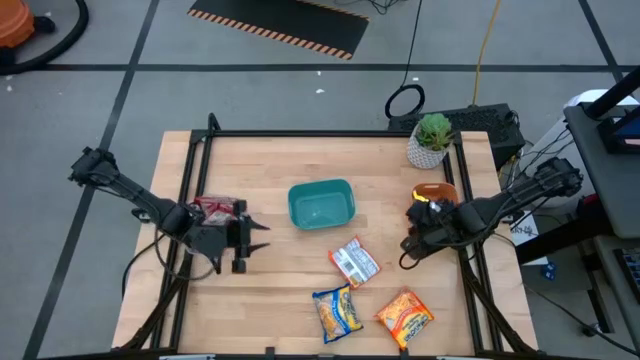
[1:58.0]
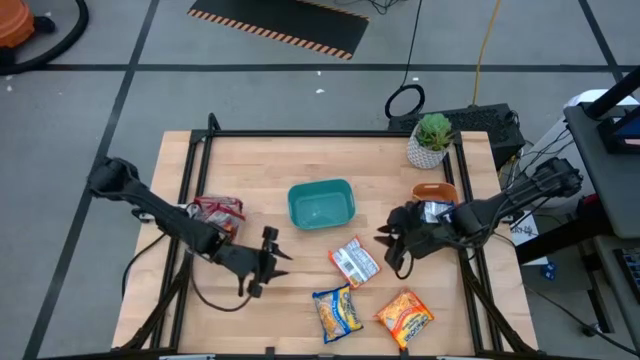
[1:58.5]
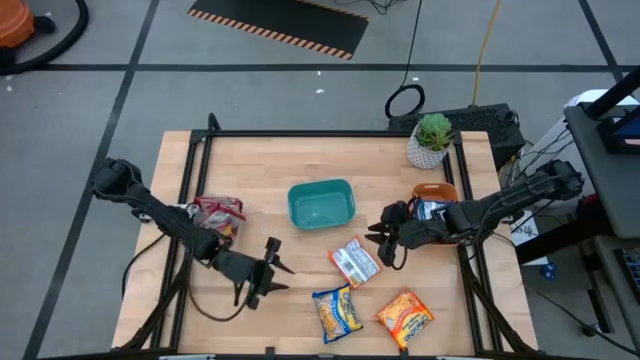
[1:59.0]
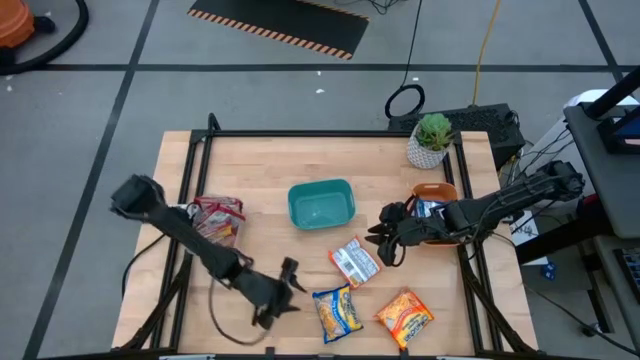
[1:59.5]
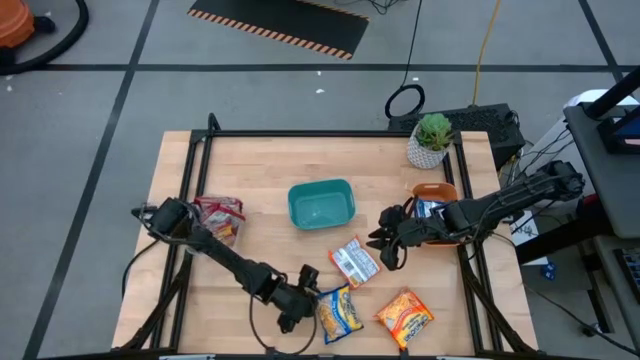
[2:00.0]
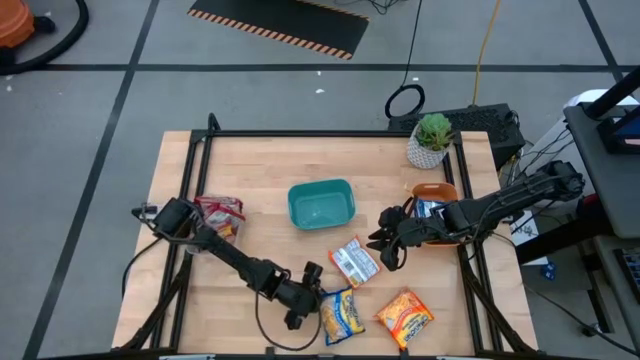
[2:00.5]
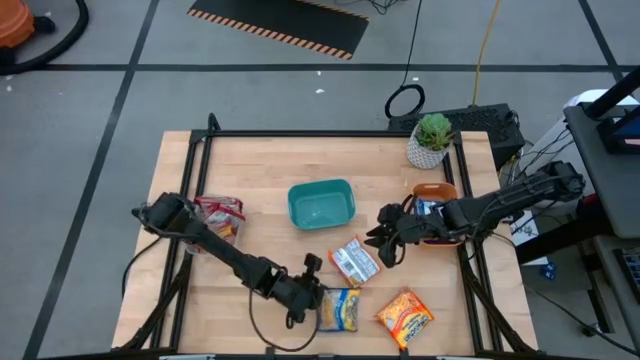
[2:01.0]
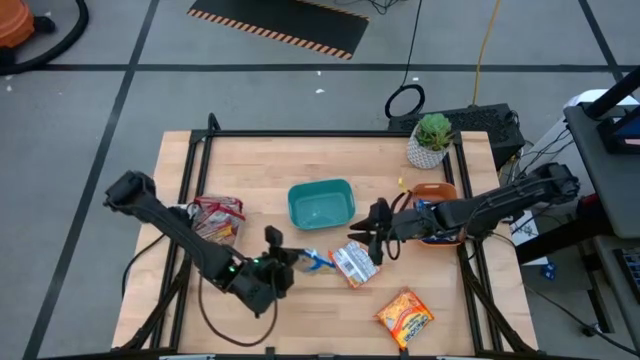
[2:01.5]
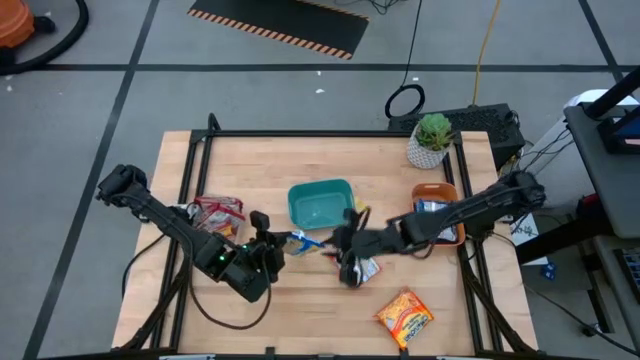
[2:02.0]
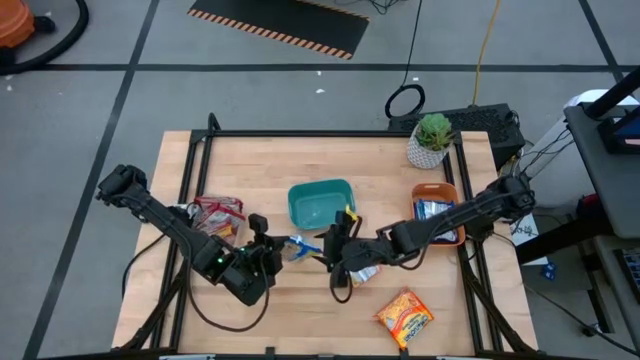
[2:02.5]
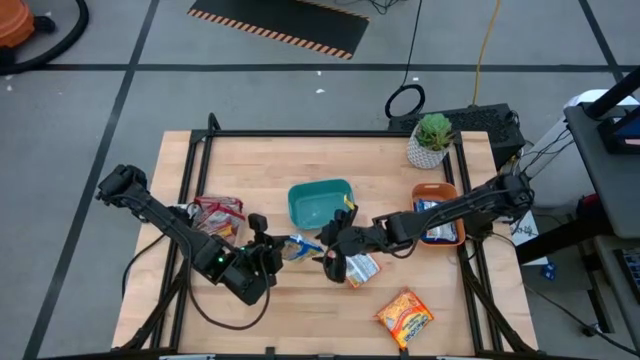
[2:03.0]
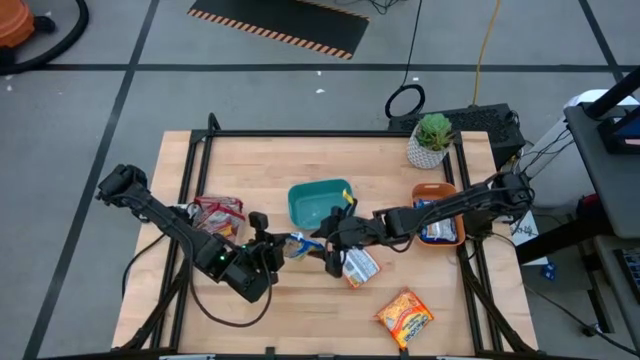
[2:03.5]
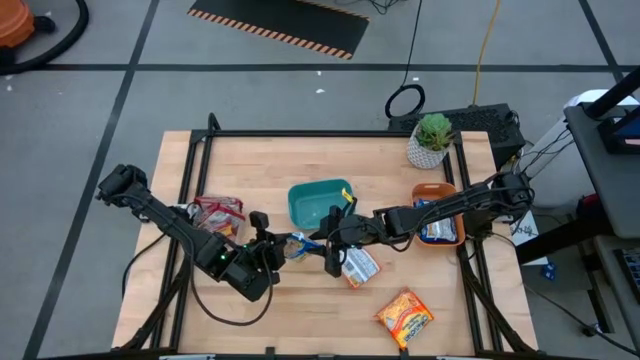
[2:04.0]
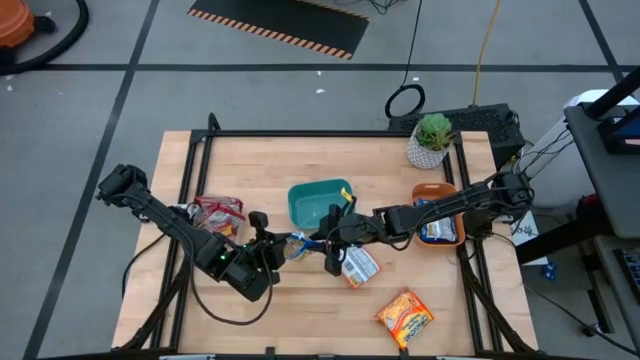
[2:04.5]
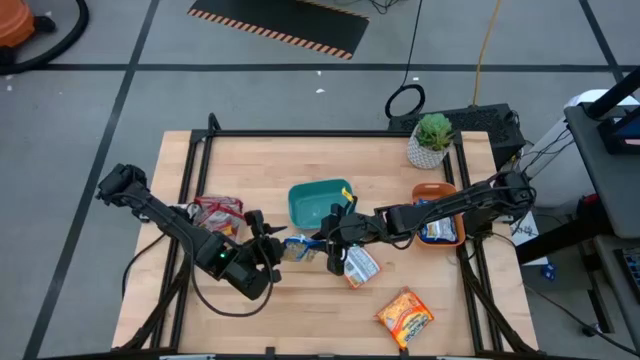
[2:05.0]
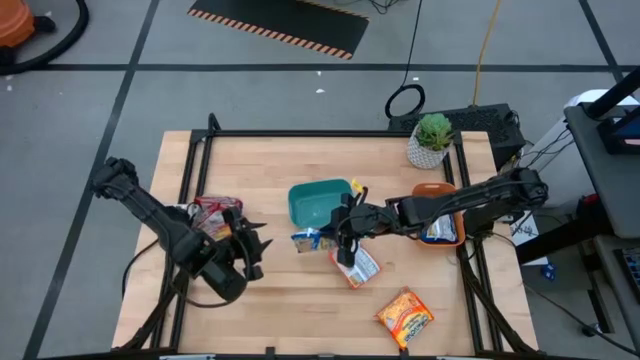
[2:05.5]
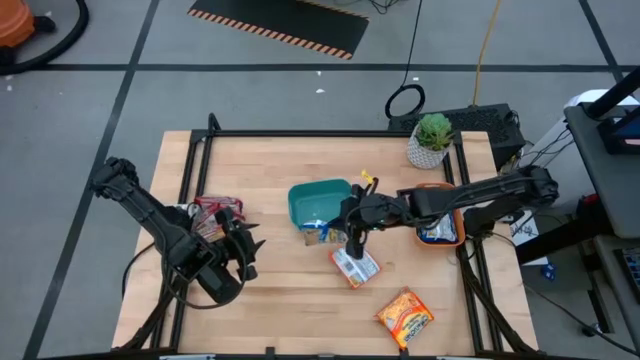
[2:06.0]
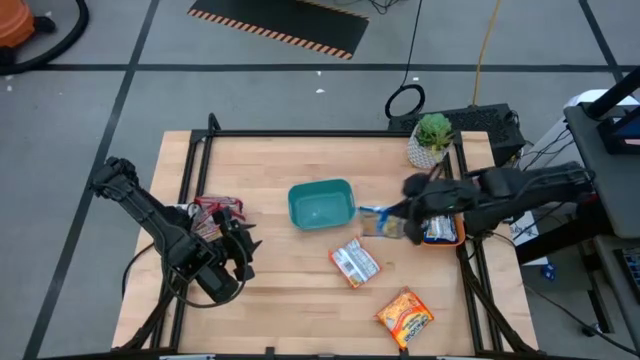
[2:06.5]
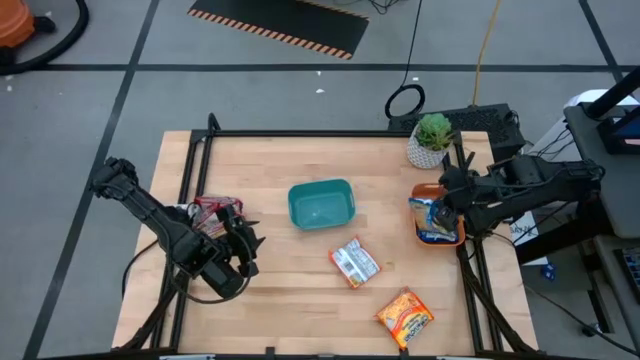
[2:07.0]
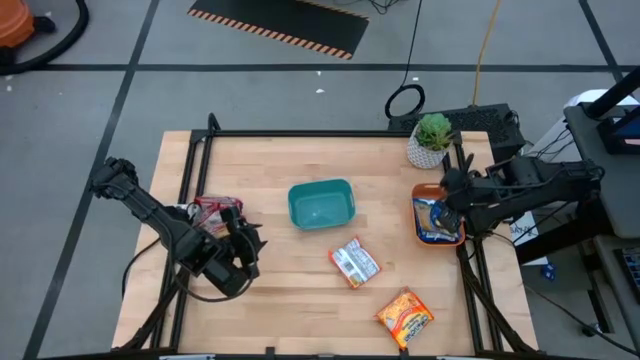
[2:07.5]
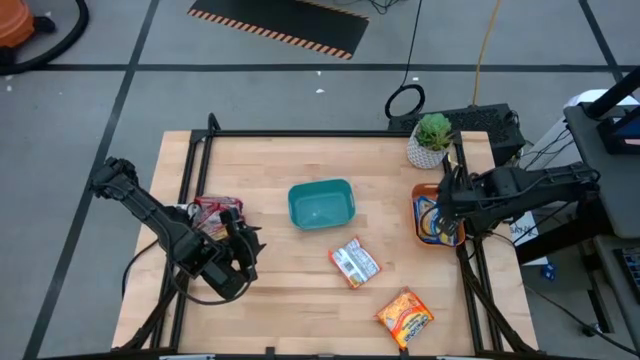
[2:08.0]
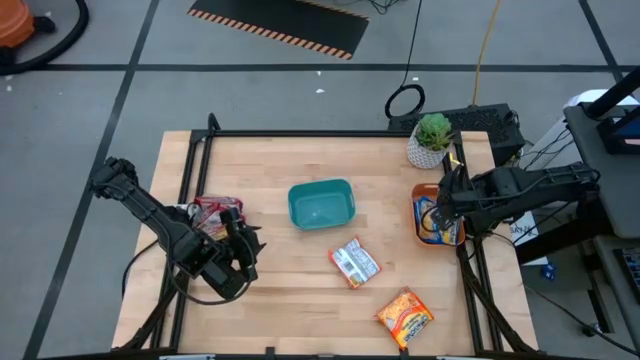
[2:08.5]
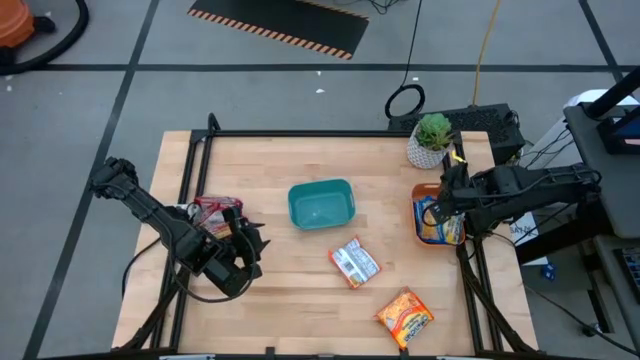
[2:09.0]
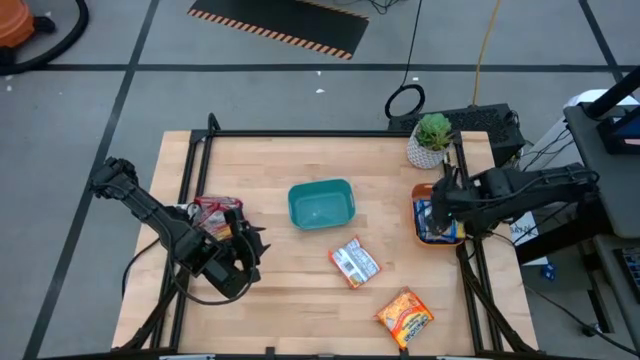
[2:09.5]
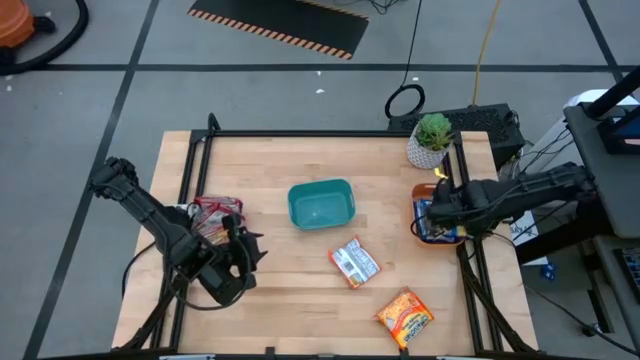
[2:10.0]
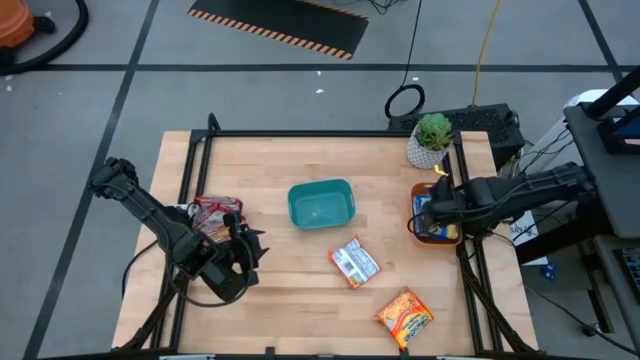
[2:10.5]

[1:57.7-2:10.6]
Task: Sort Maruchan noodles
Put the blue noodle pack into the orange bin

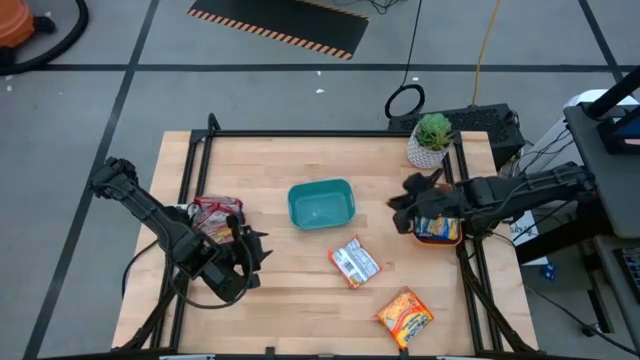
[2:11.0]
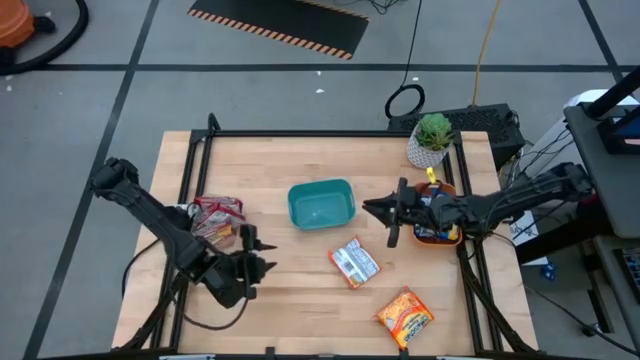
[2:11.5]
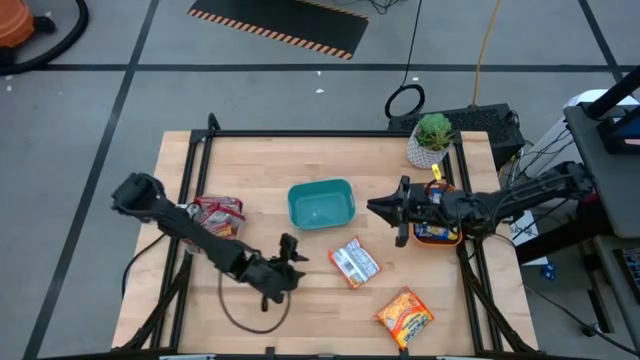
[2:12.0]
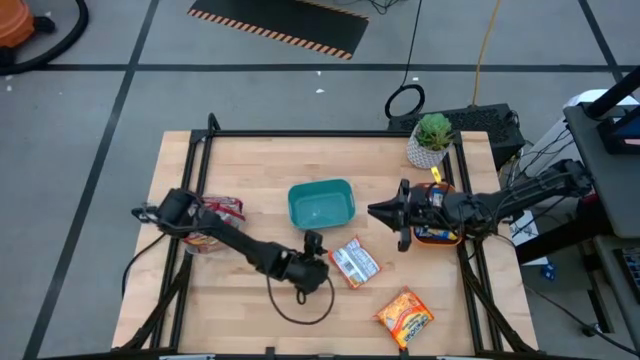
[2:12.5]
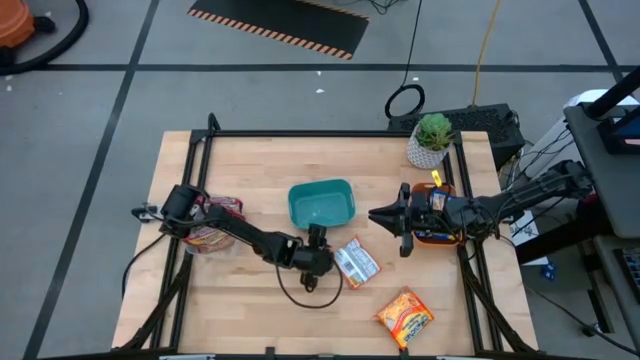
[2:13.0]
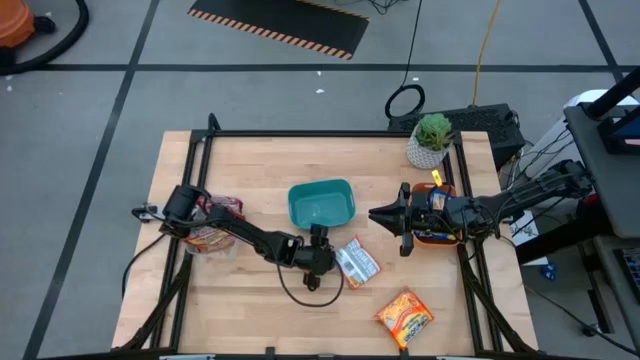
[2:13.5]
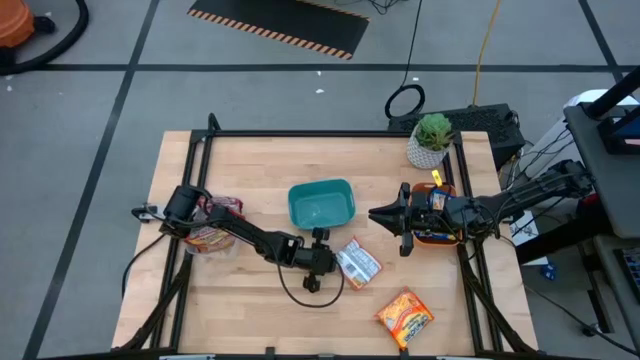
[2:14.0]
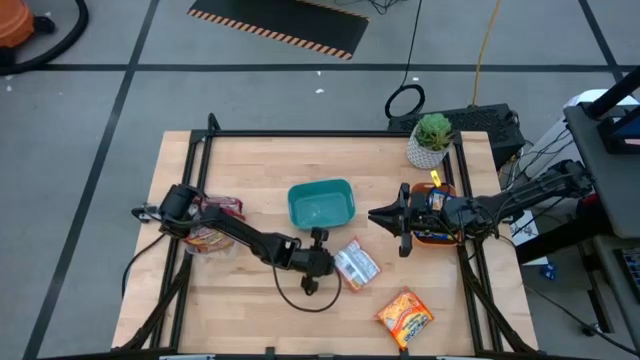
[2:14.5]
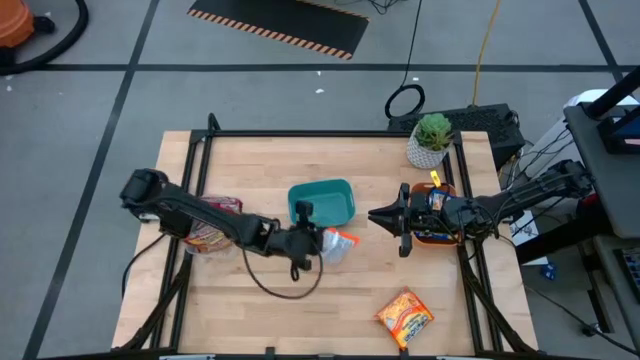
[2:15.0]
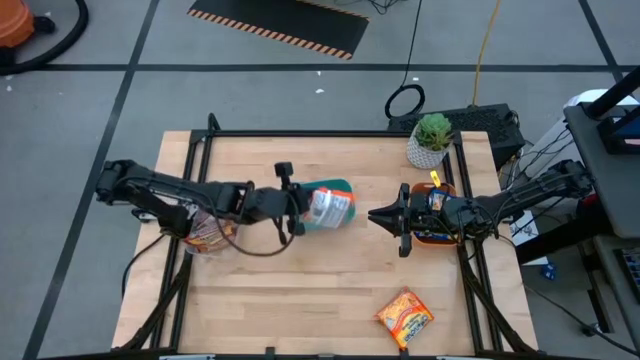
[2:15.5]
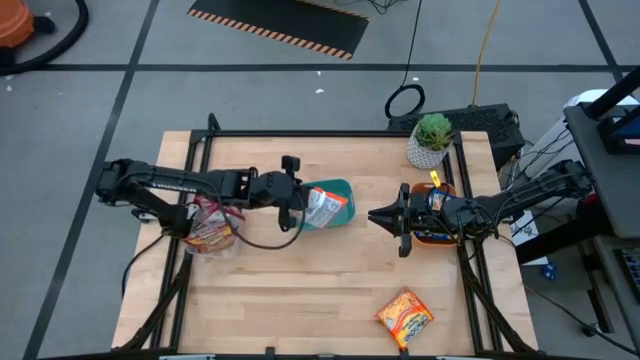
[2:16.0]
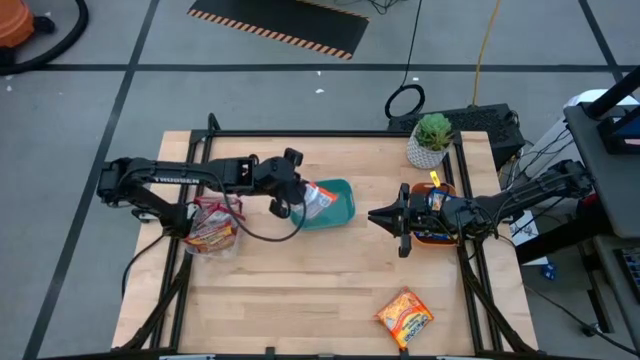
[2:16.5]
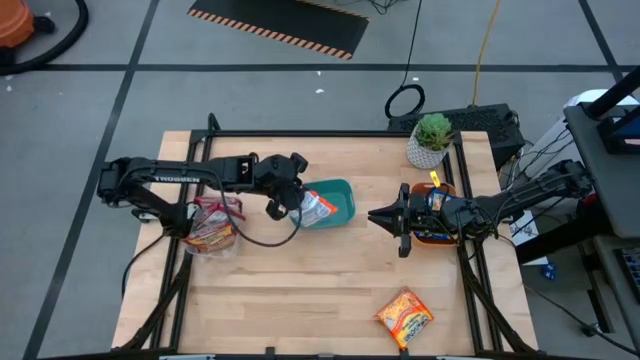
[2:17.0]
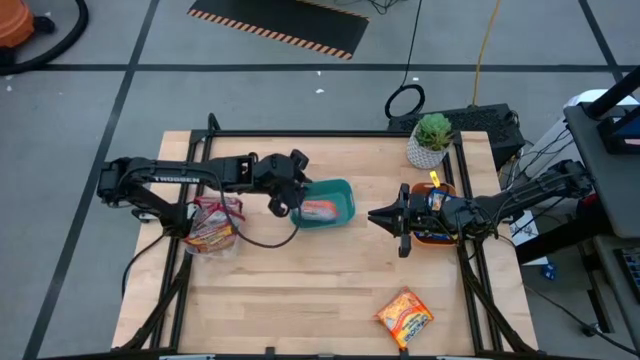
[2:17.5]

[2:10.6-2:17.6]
Put the top orange noodle pack into the green bin
